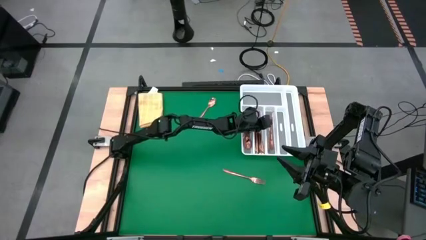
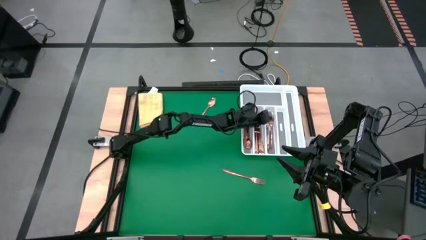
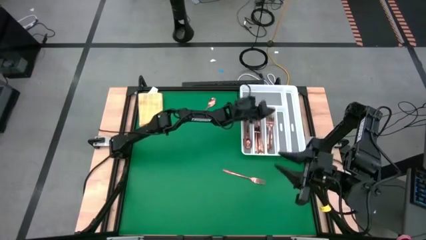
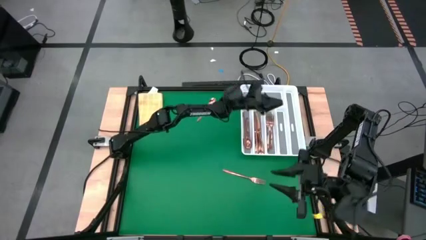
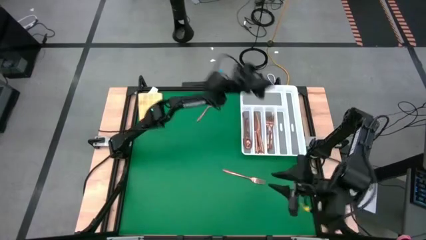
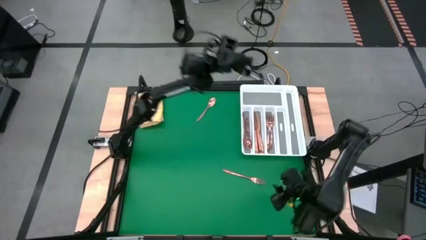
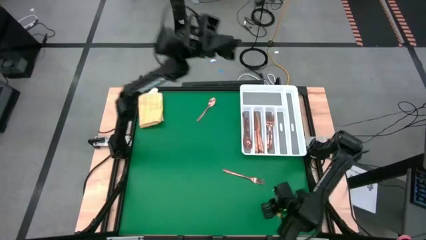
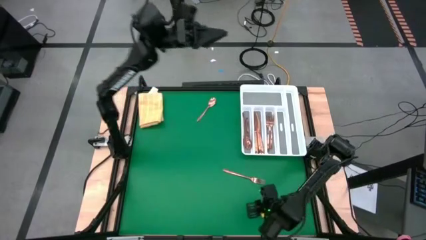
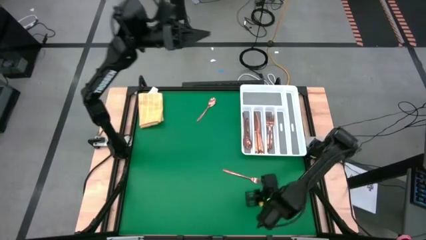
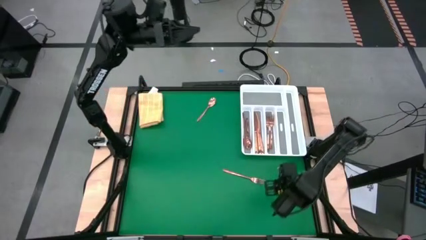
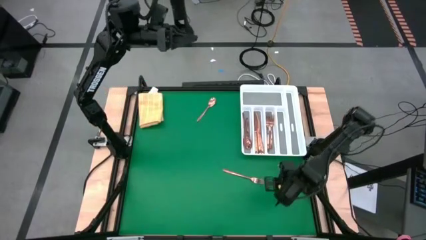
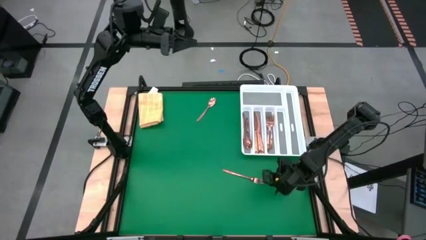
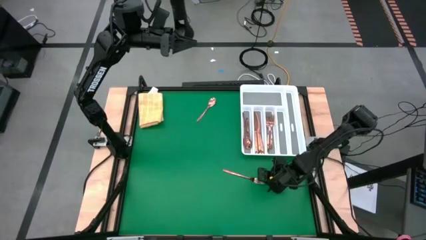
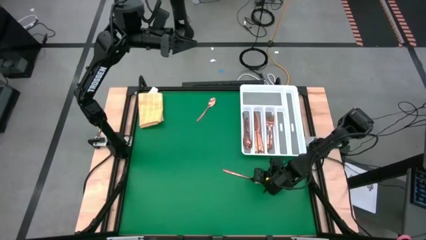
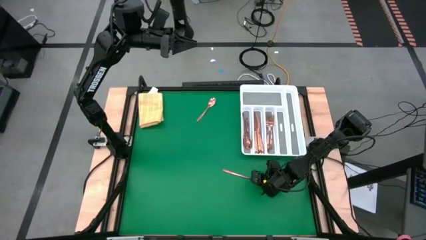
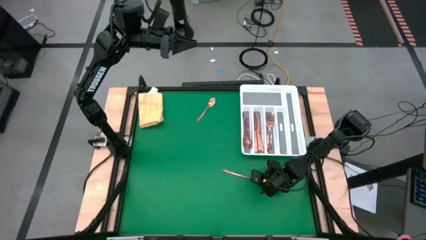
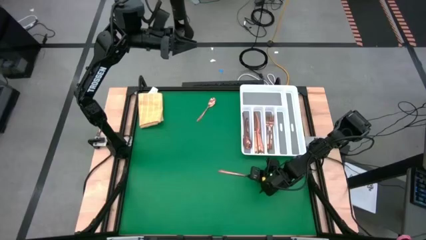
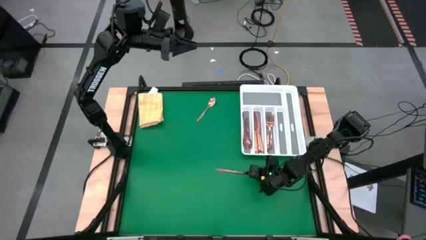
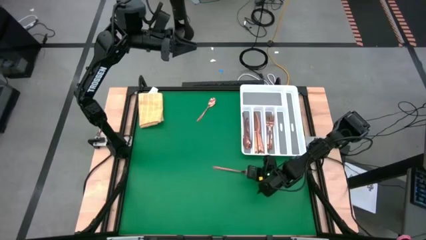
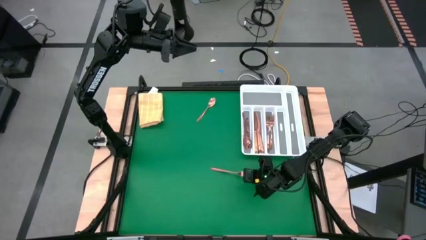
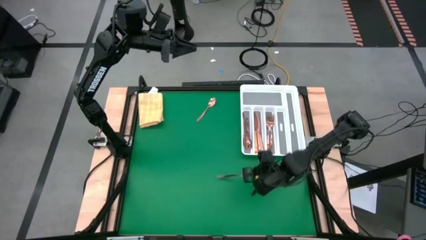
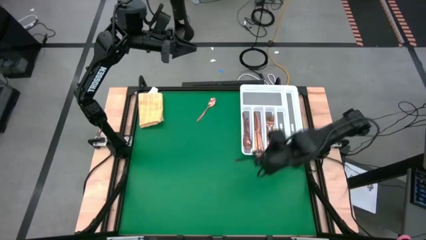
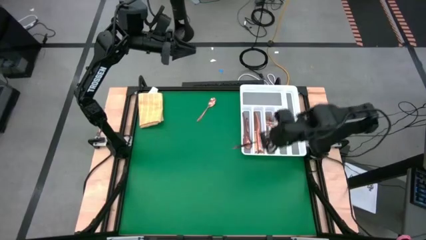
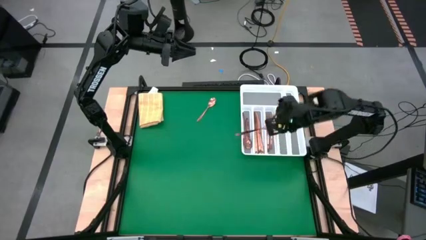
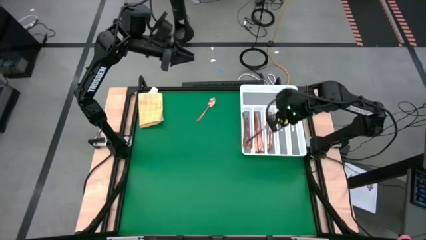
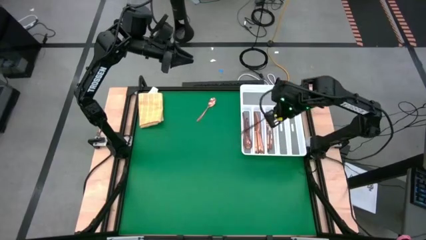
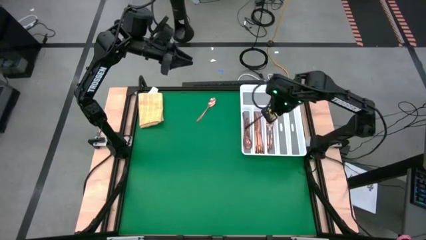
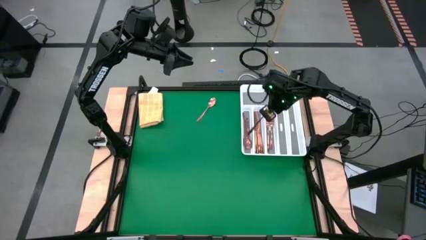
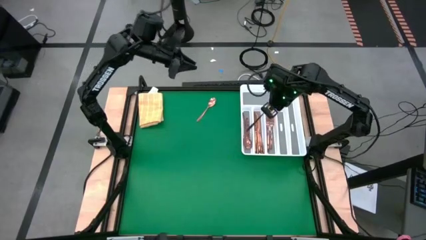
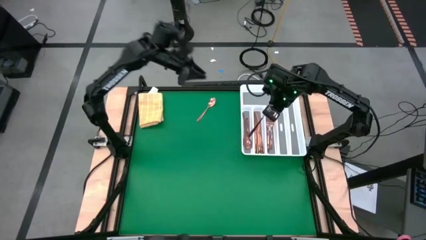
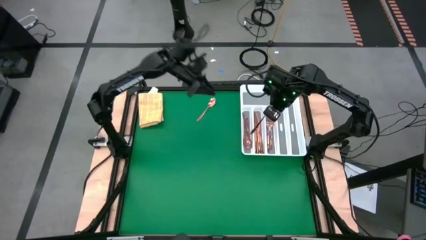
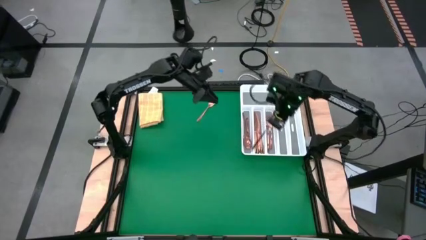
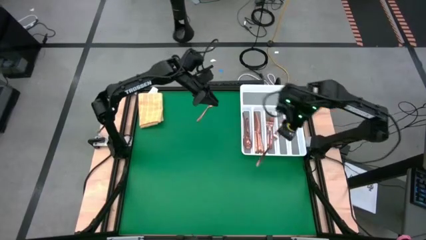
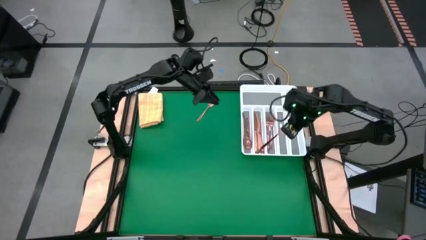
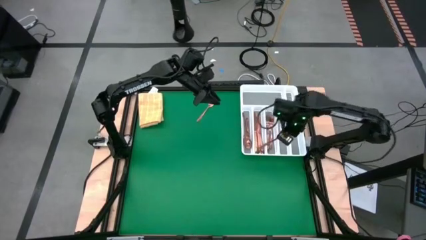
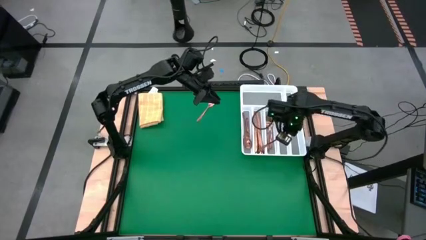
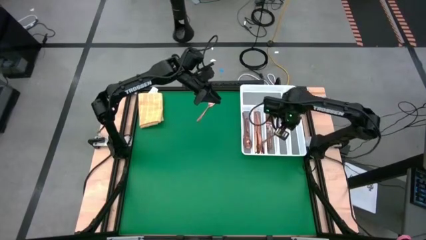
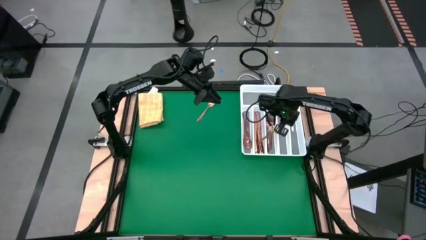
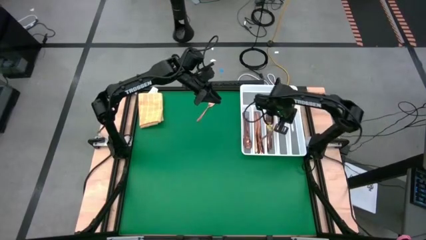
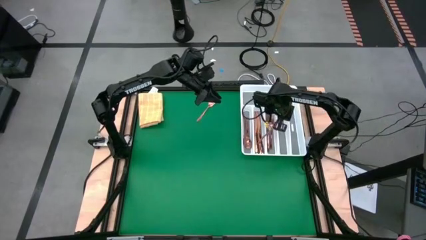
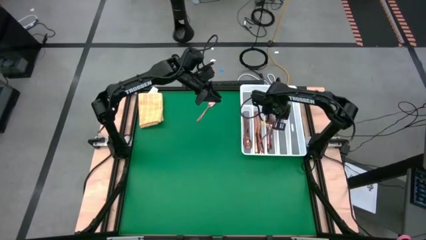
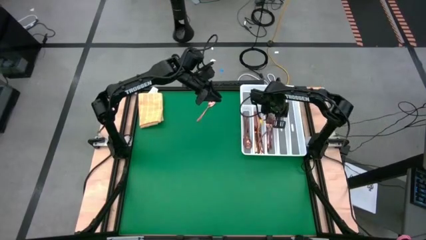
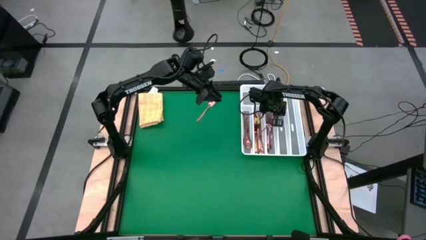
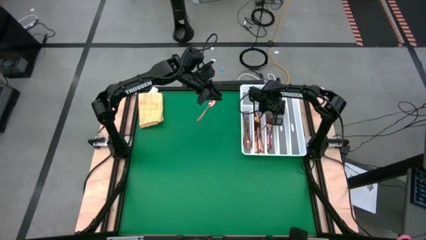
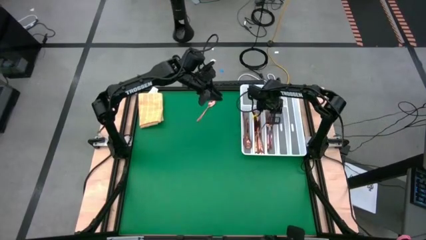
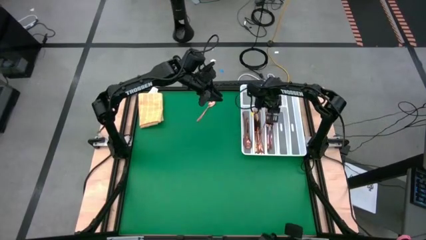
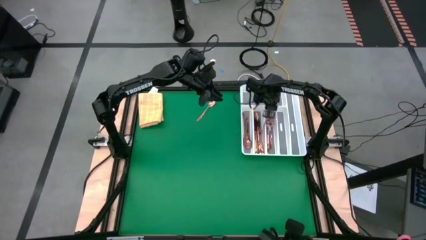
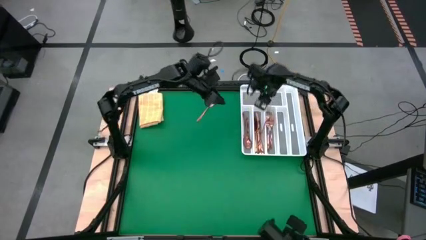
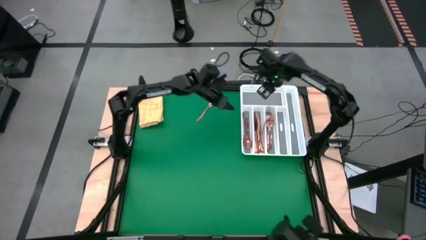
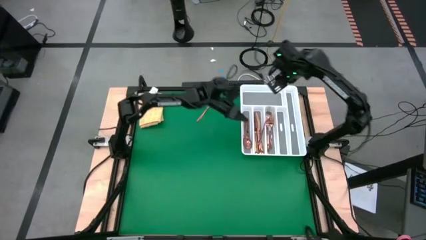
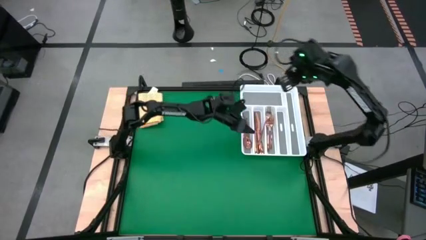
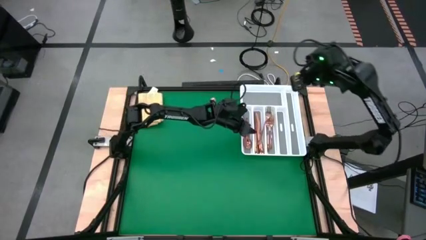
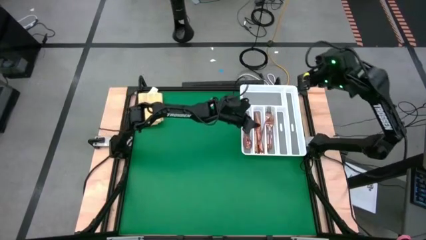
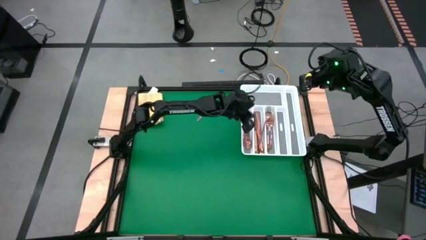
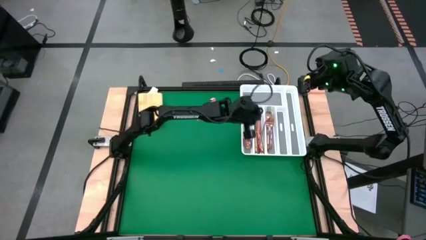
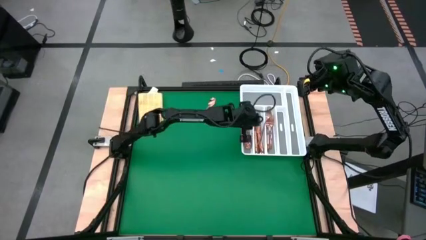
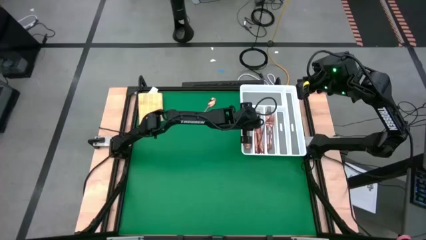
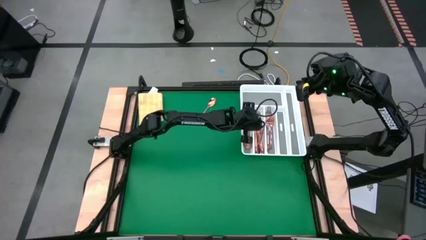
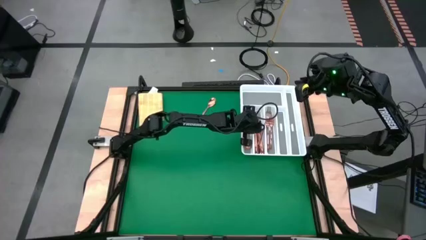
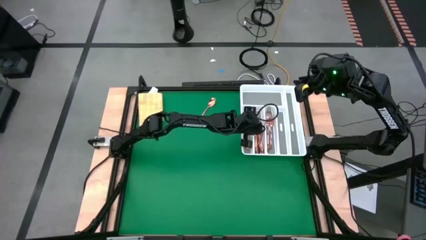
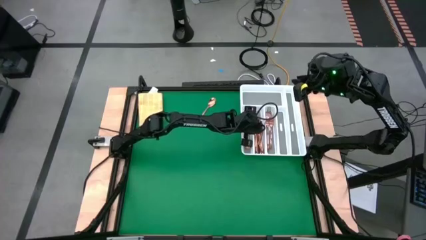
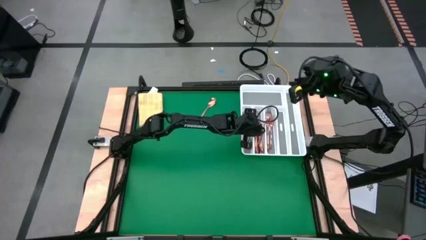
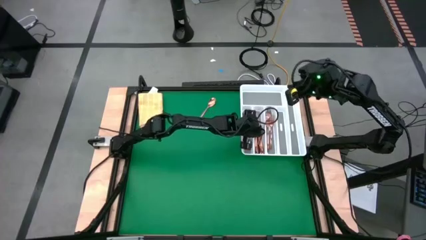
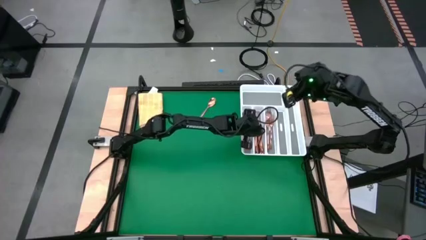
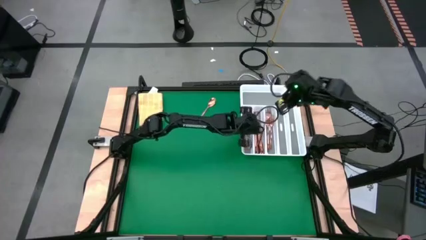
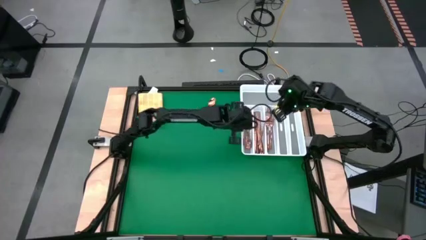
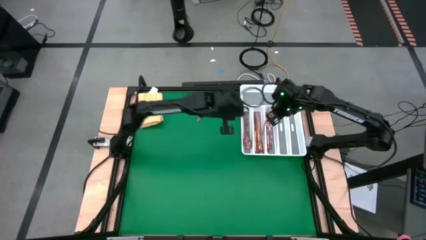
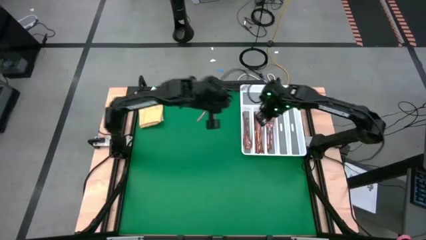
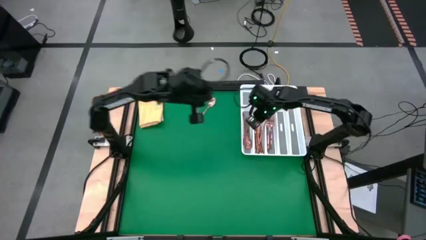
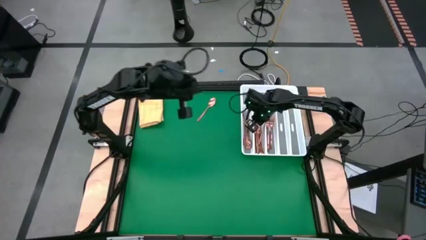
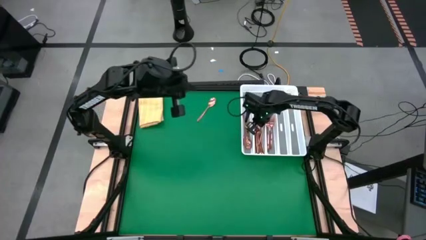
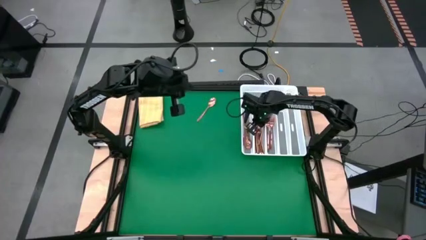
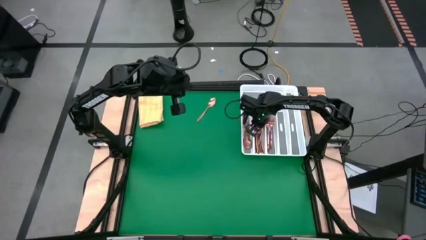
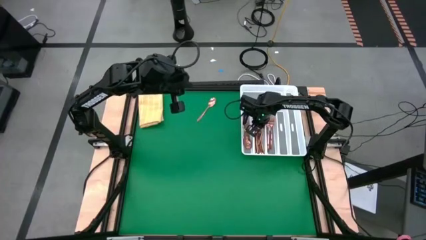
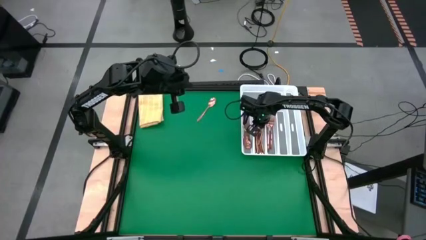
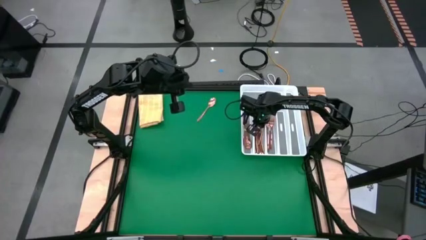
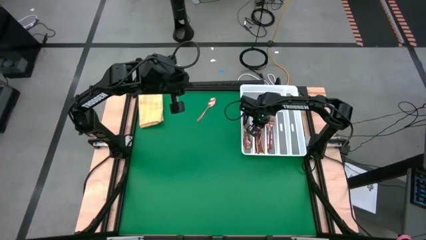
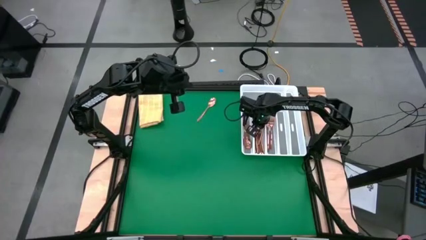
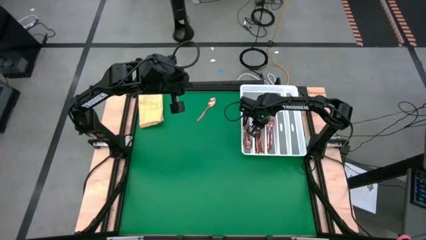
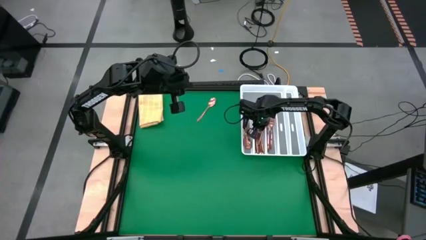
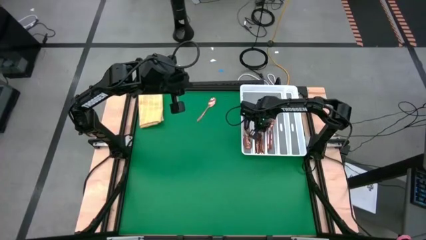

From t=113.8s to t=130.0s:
Task: Sort silverware
Put the gold fork into the silverware organizer
